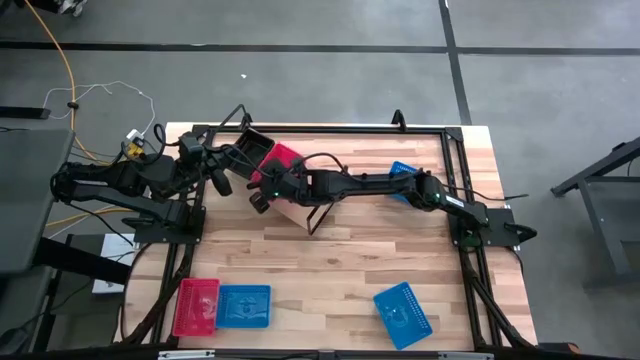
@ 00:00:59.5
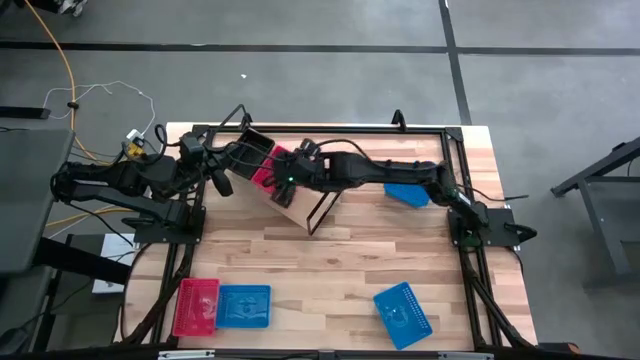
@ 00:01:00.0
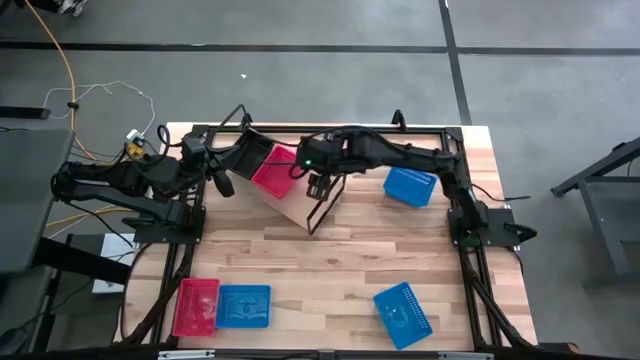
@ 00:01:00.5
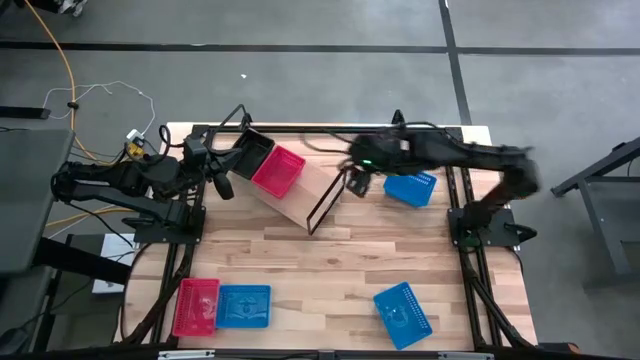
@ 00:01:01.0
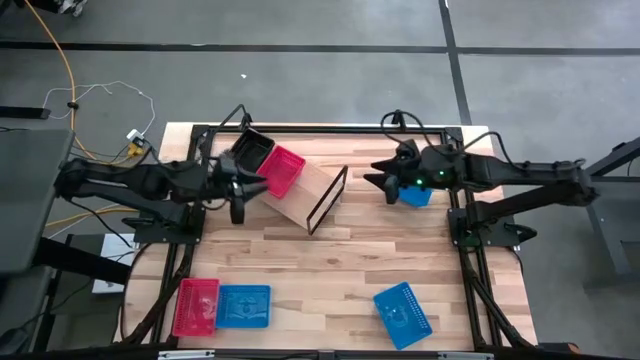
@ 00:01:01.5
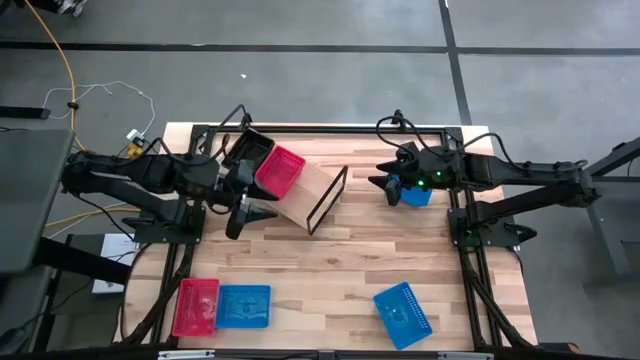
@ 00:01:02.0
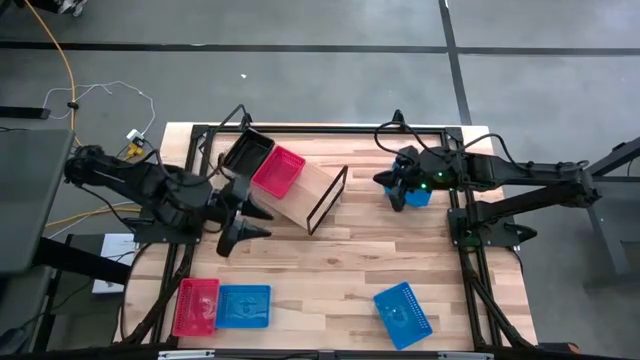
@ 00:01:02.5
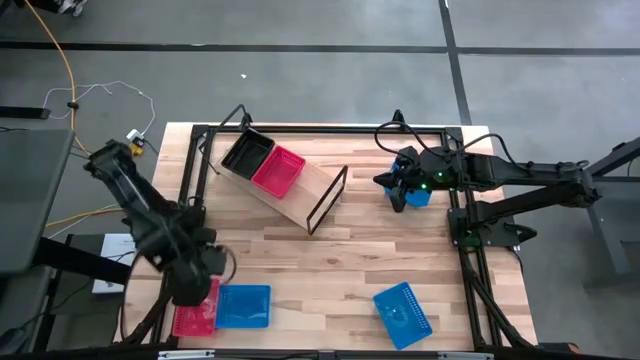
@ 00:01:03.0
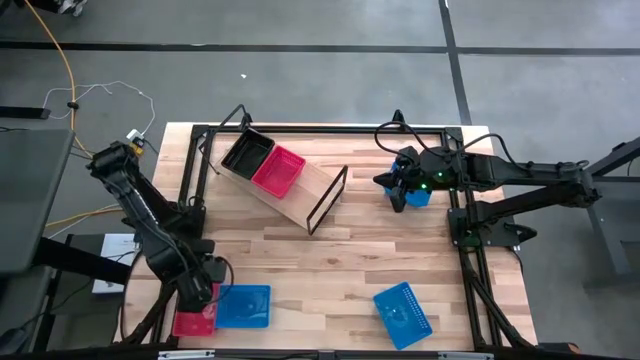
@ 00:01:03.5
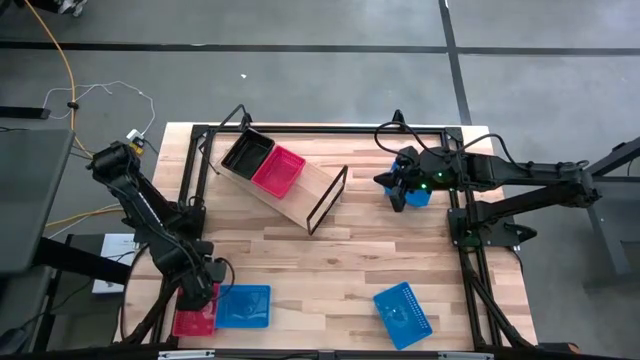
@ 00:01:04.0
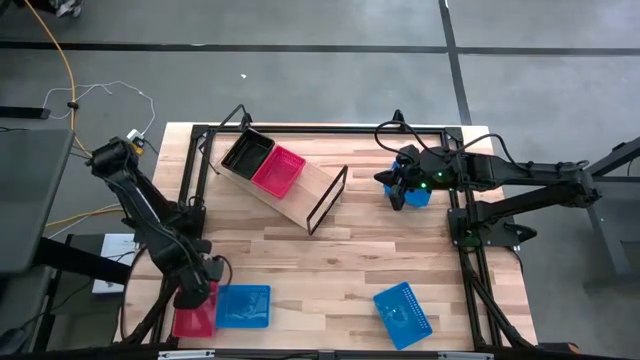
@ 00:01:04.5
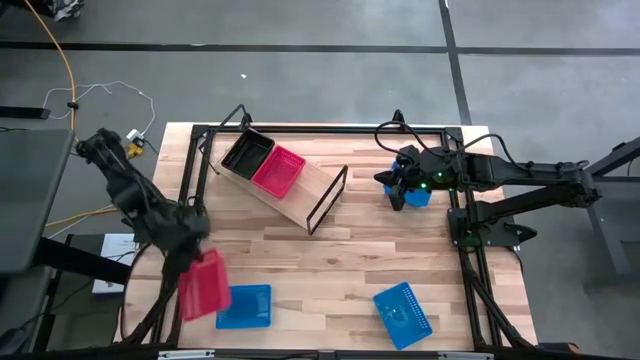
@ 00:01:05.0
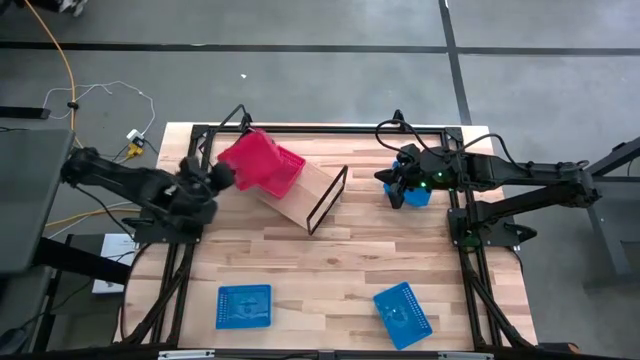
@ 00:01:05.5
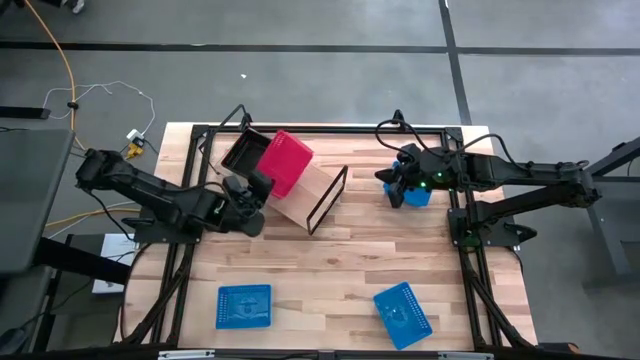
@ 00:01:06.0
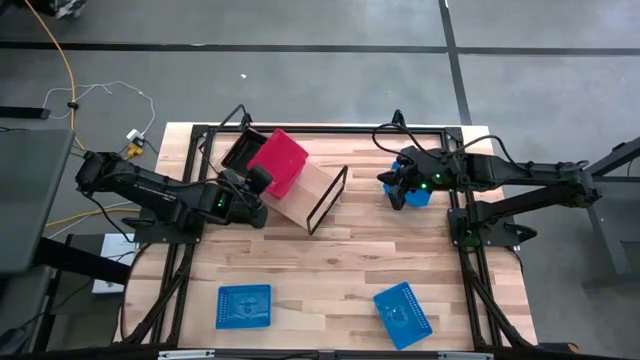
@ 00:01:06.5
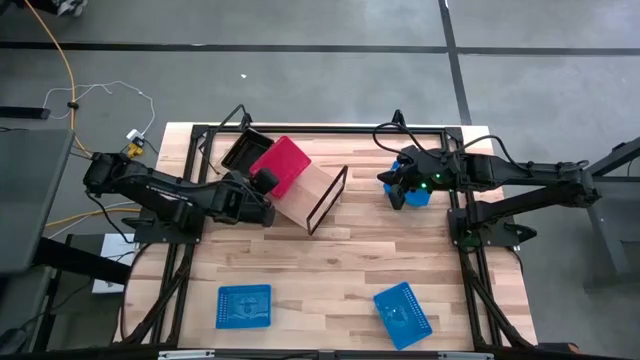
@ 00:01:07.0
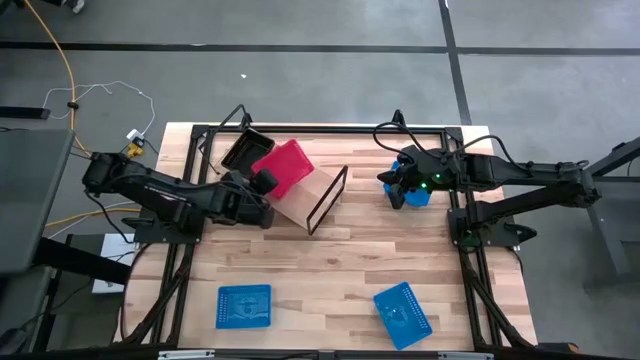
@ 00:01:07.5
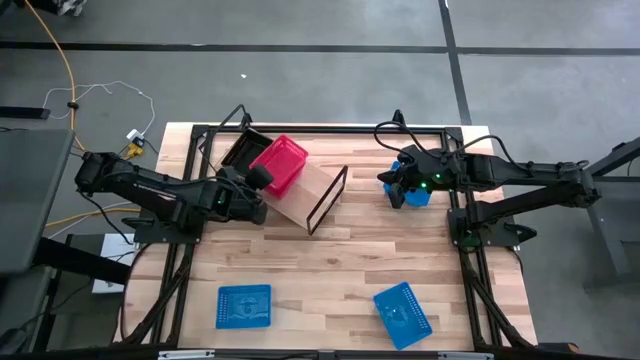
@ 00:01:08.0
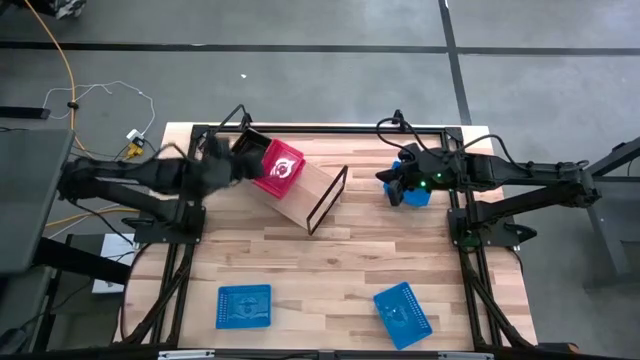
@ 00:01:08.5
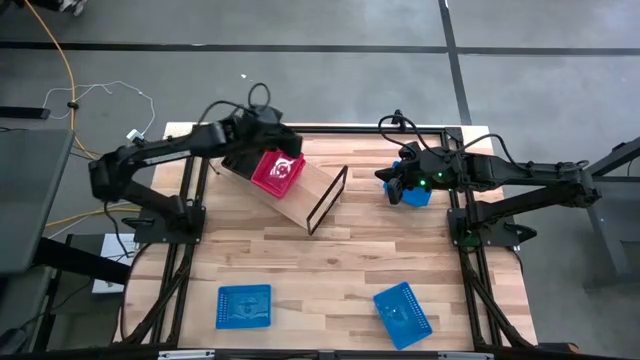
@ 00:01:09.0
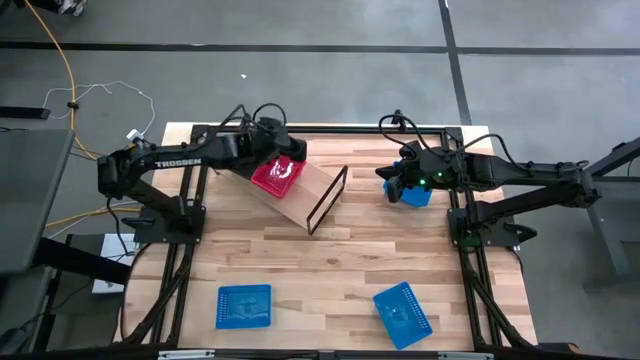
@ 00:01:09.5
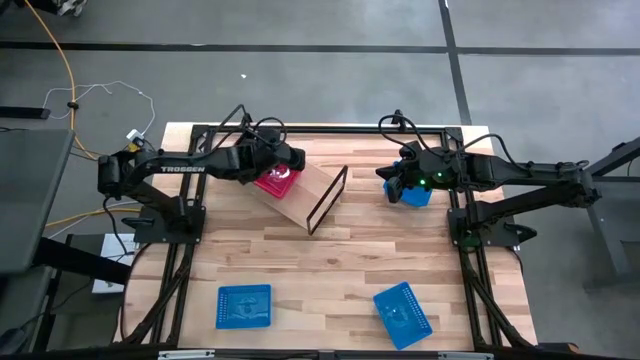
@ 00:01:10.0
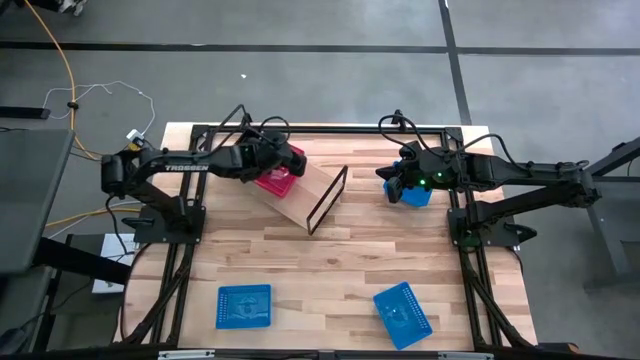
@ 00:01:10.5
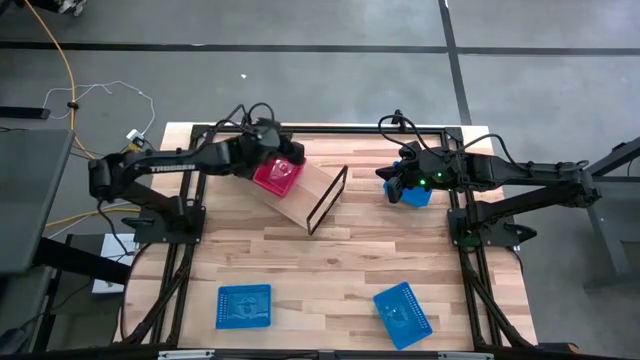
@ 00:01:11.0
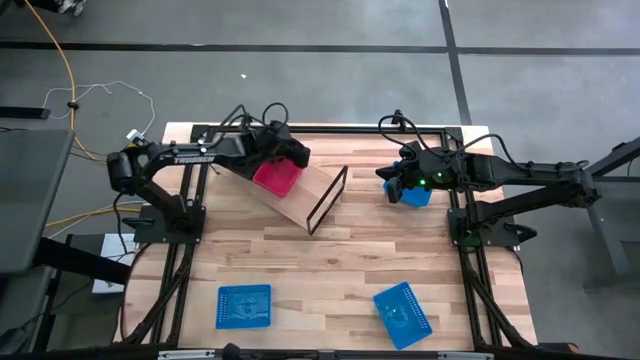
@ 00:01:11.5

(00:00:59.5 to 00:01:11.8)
Task: Stack baskets on shelf by color
Stack the red bin into the red bin on the shelf

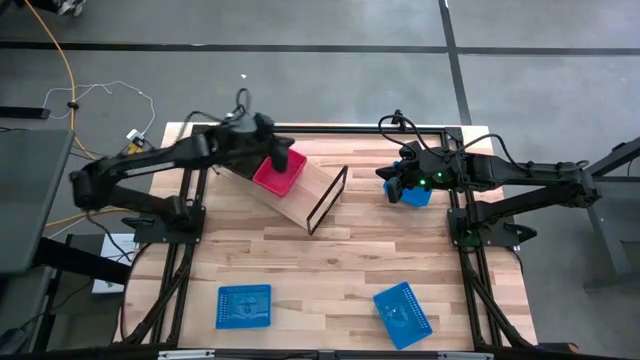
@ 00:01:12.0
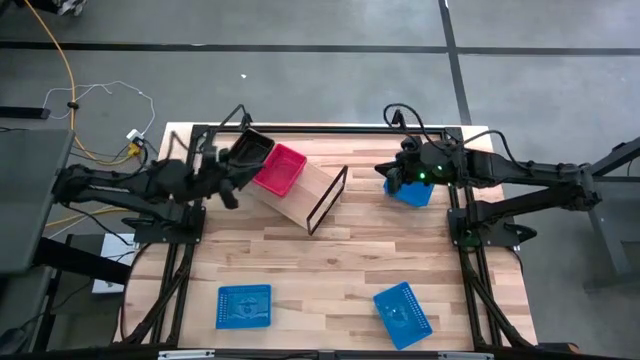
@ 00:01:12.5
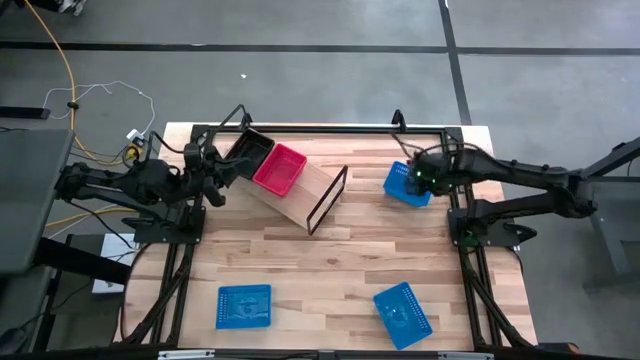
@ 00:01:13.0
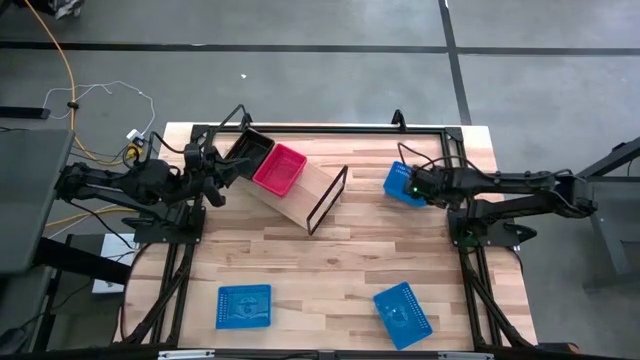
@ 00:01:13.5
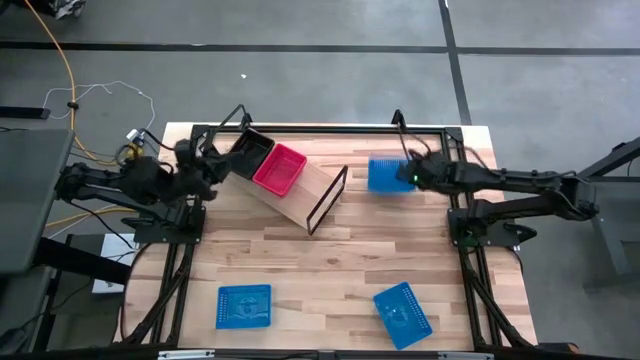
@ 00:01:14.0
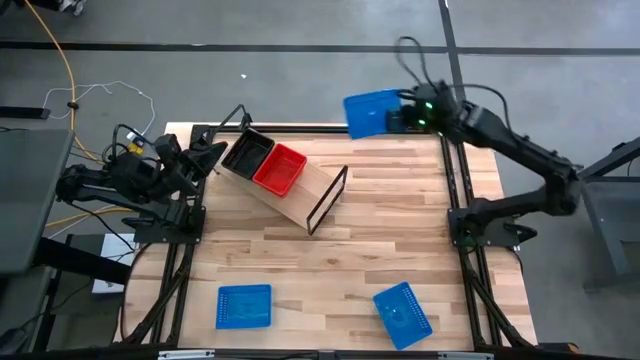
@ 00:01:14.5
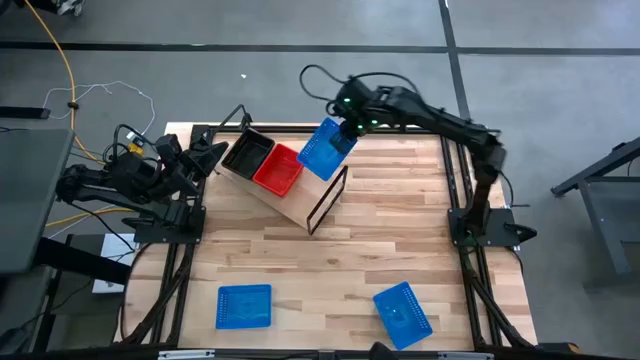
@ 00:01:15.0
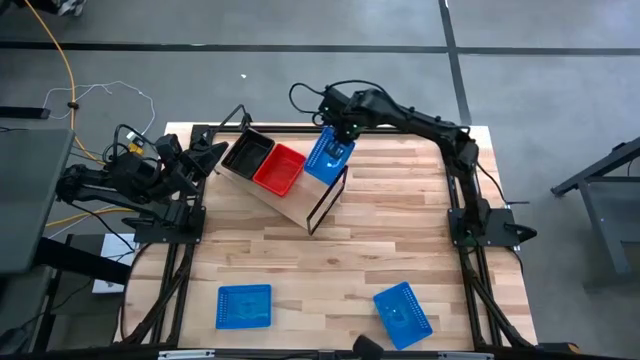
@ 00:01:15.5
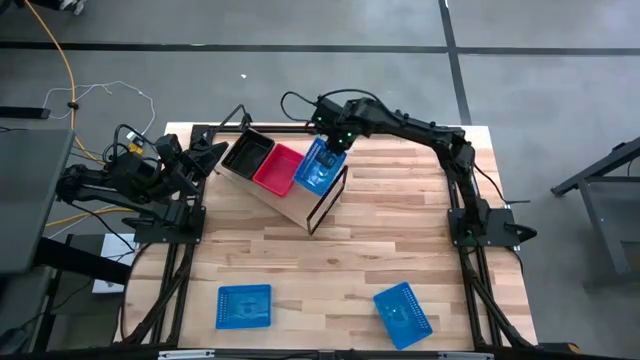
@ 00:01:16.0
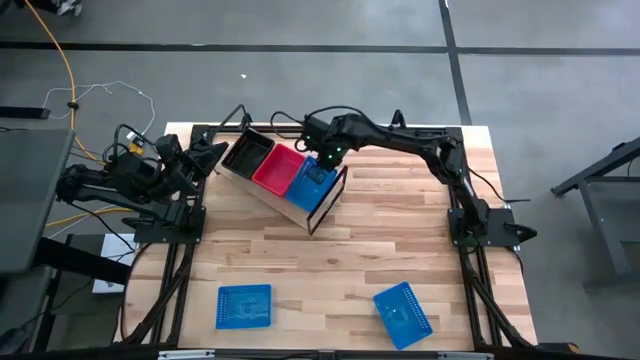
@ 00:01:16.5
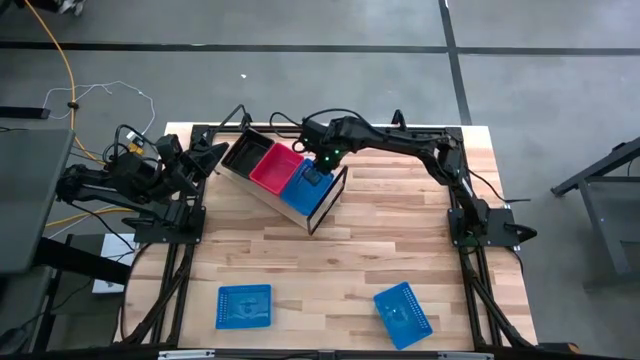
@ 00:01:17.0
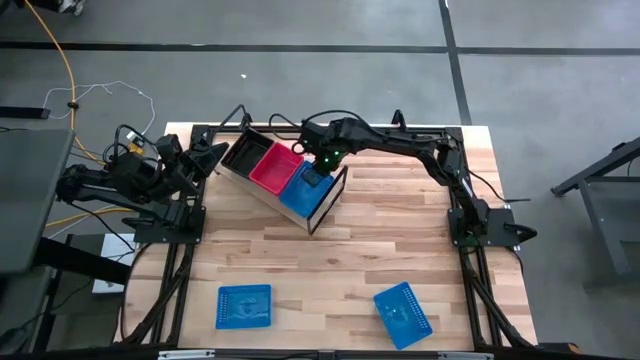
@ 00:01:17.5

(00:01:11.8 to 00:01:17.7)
Put the top right blue bin on the shelf

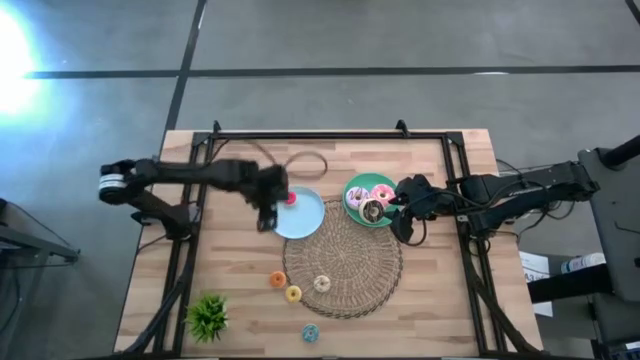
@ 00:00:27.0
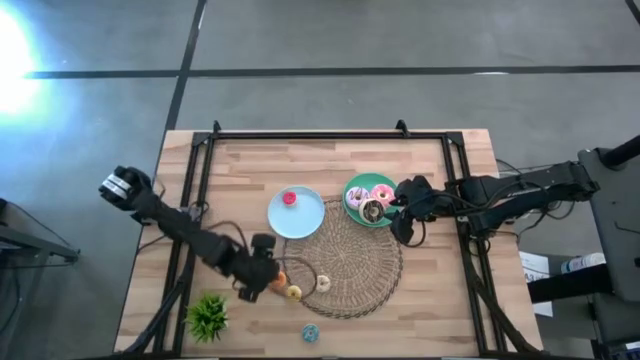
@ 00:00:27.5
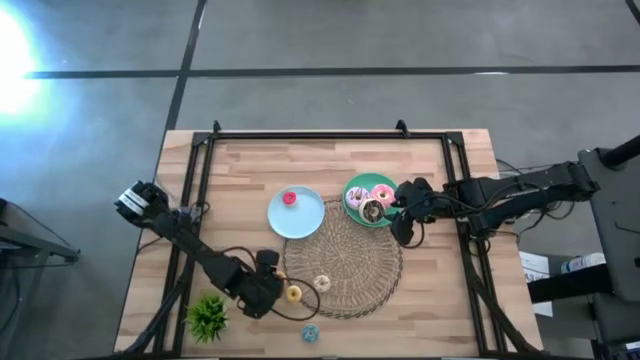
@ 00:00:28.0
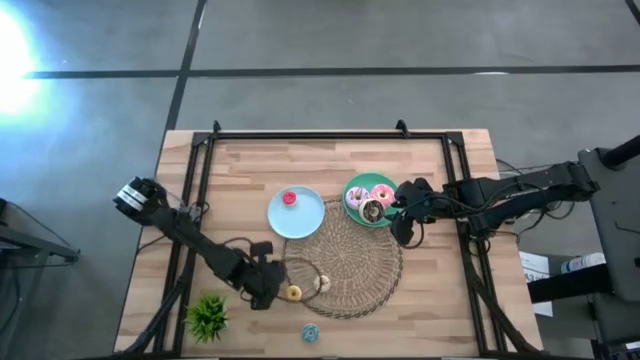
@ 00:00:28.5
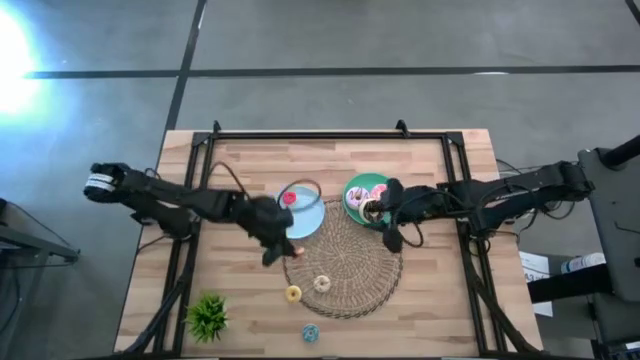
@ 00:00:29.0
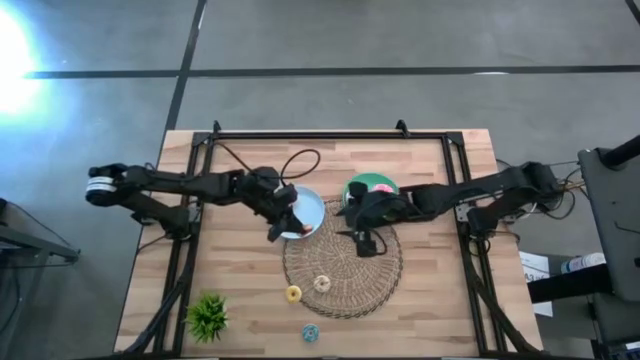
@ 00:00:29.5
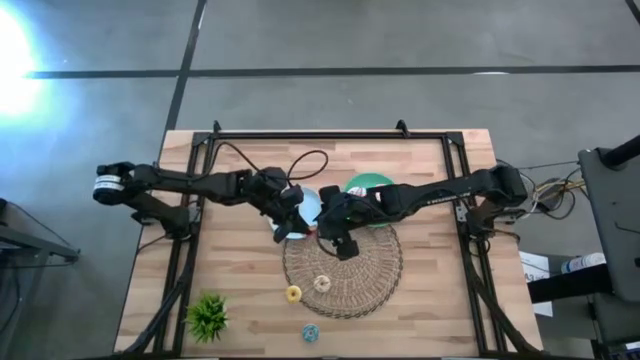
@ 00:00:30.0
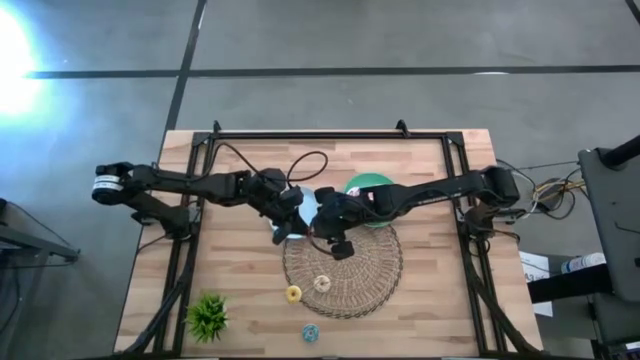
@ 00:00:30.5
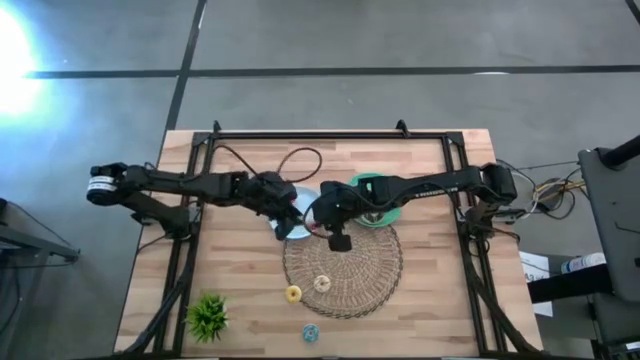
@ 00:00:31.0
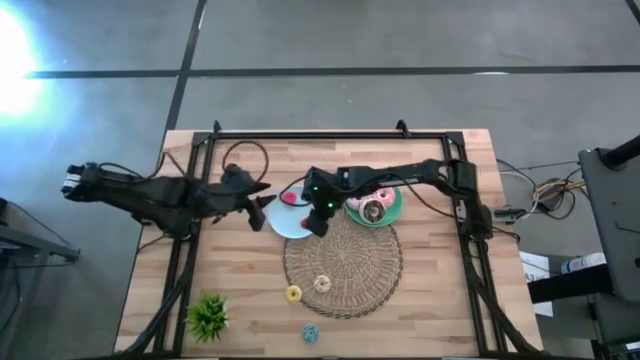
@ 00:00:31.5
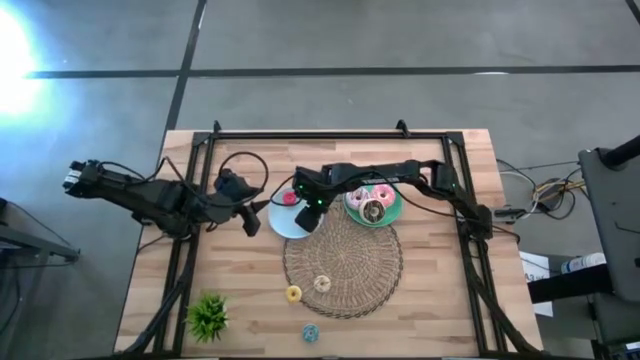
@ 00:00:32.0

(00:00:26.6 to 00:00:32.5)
Task: Pick & Place donuts
Put the small orange donut on the blue plate
